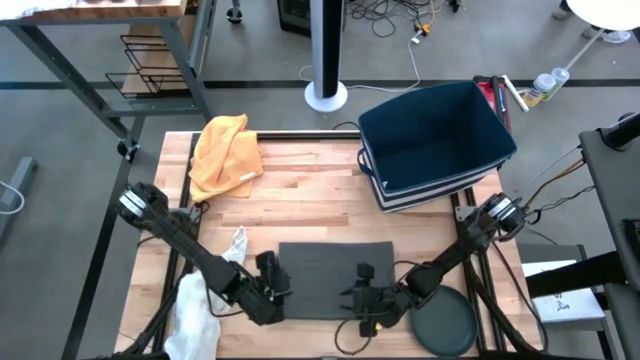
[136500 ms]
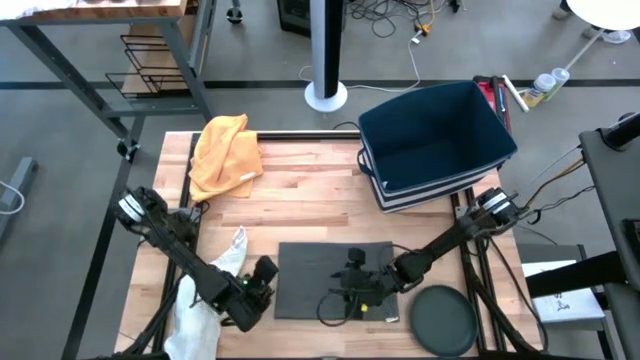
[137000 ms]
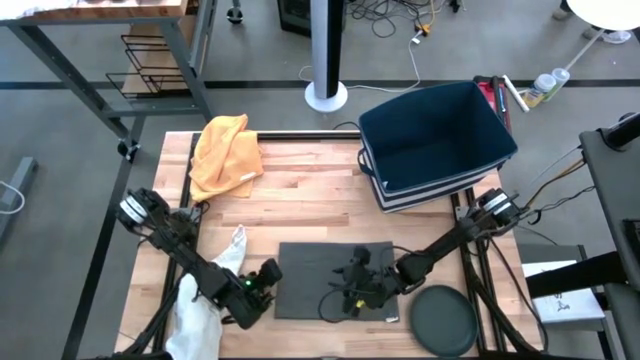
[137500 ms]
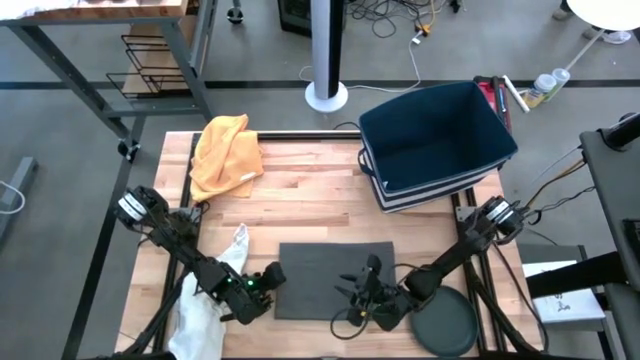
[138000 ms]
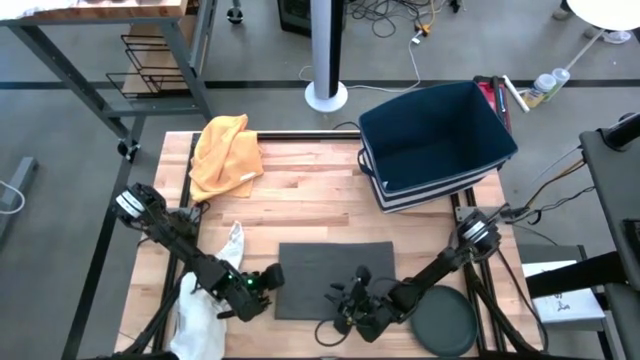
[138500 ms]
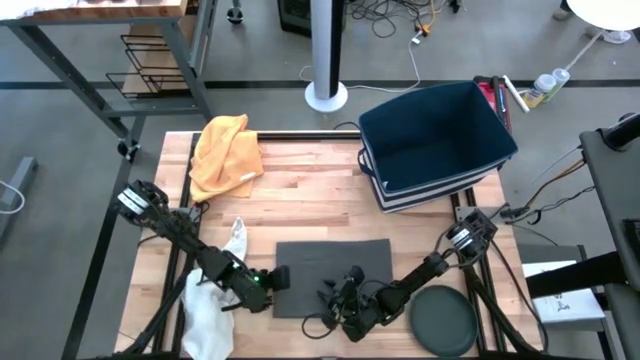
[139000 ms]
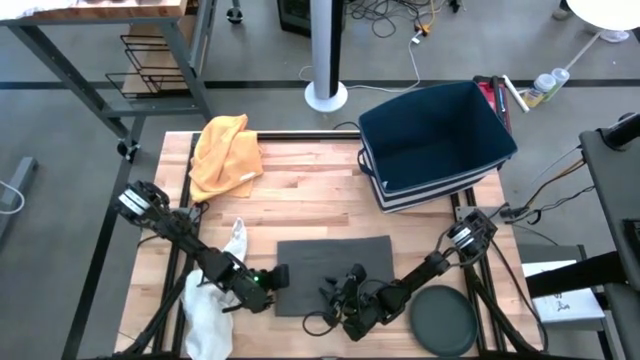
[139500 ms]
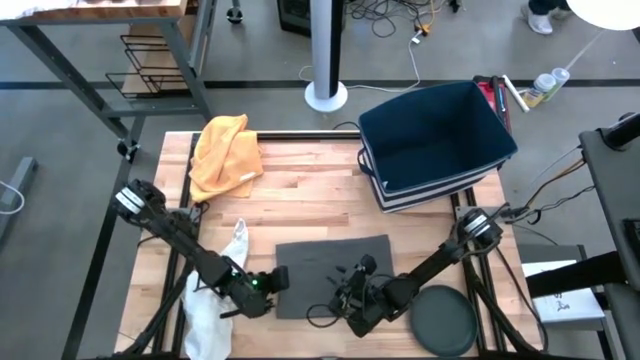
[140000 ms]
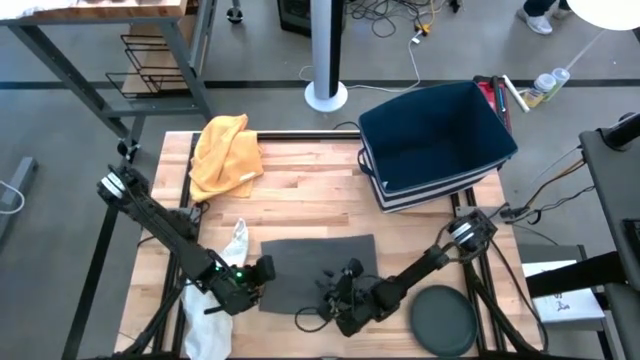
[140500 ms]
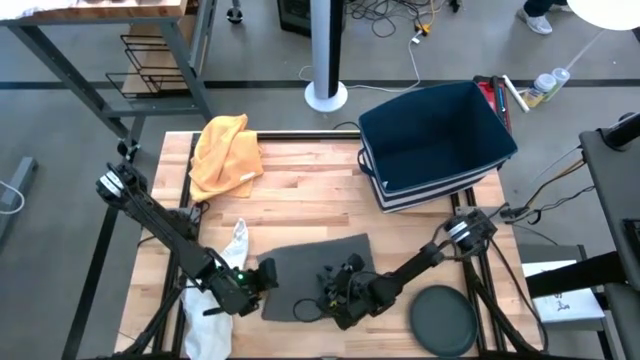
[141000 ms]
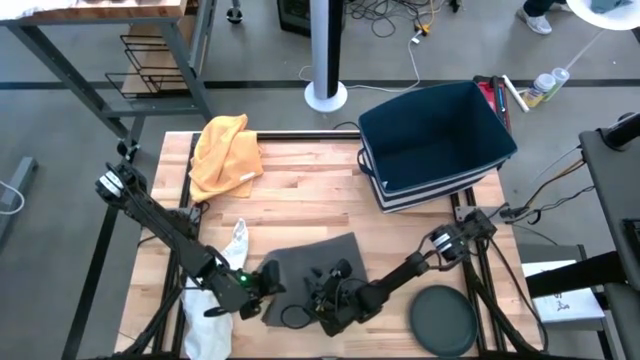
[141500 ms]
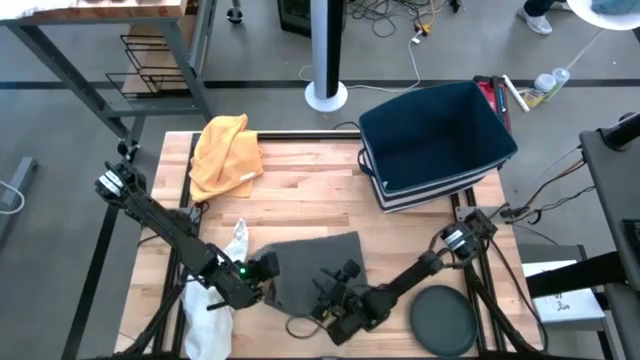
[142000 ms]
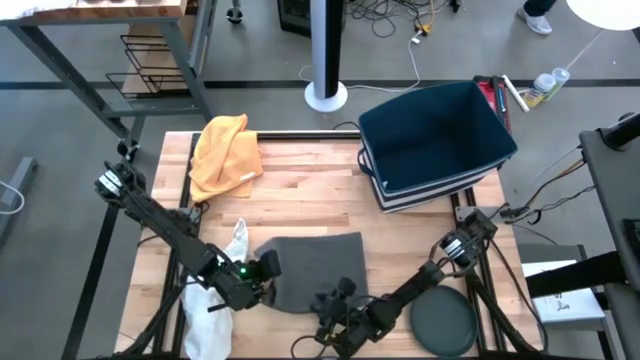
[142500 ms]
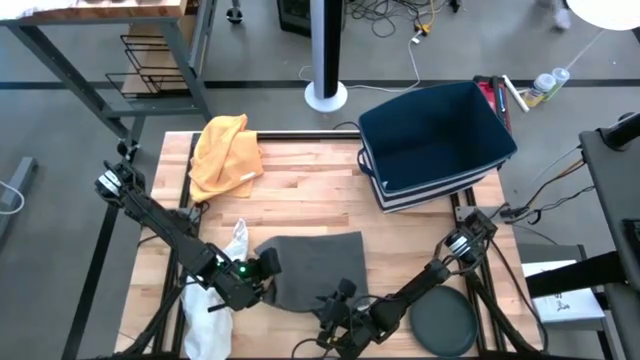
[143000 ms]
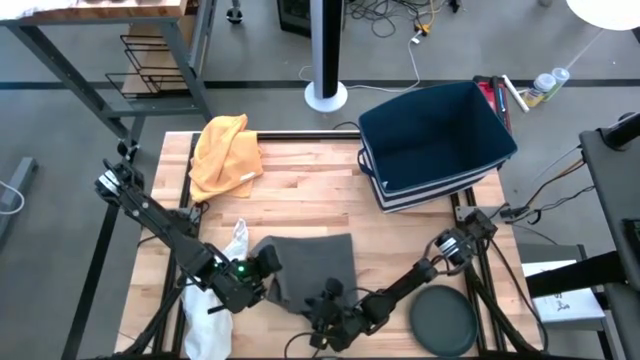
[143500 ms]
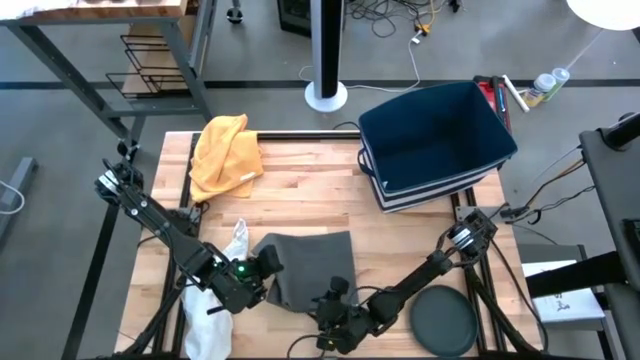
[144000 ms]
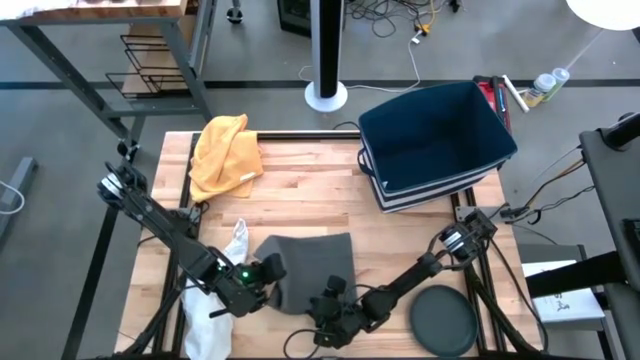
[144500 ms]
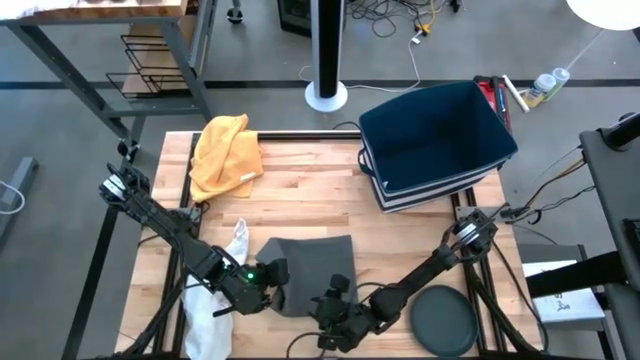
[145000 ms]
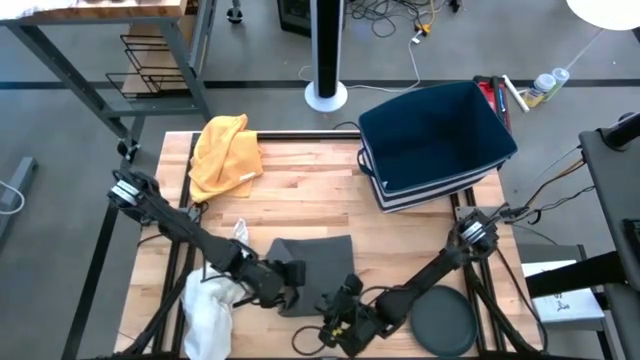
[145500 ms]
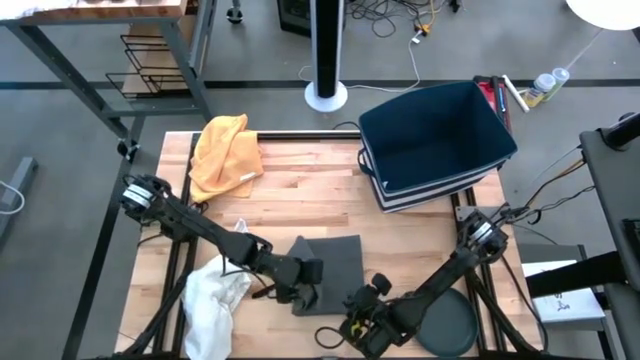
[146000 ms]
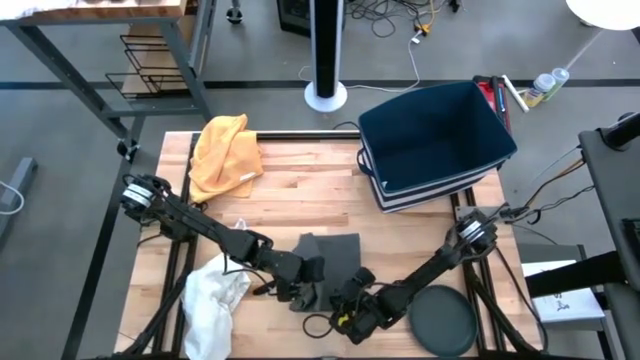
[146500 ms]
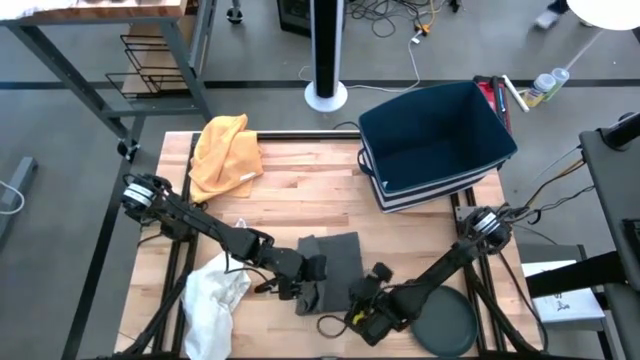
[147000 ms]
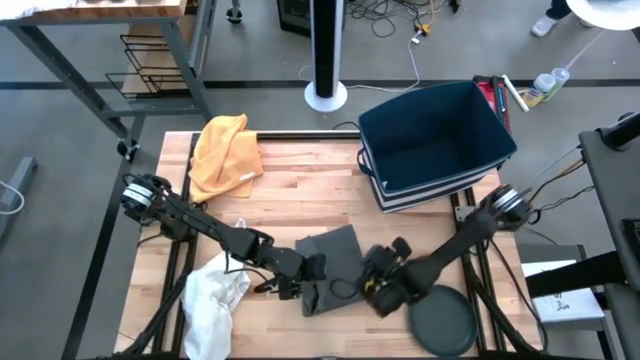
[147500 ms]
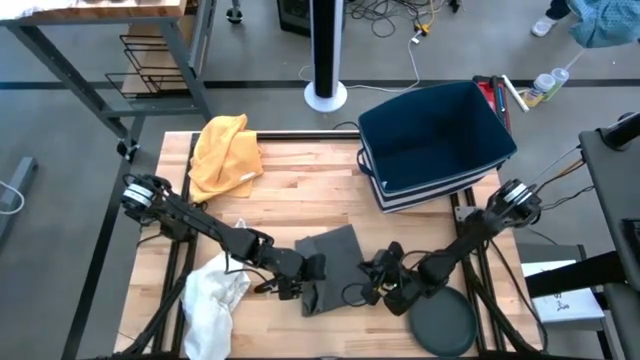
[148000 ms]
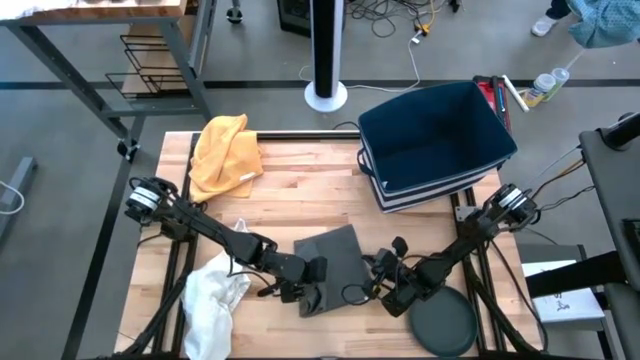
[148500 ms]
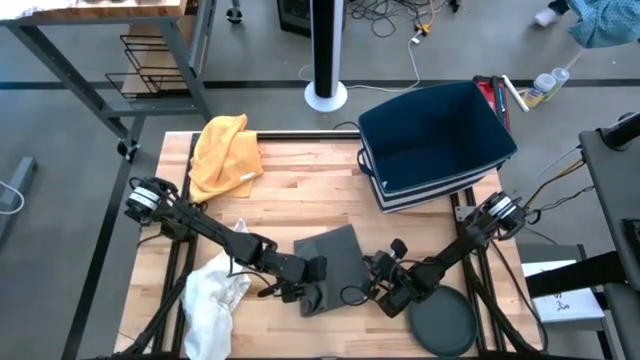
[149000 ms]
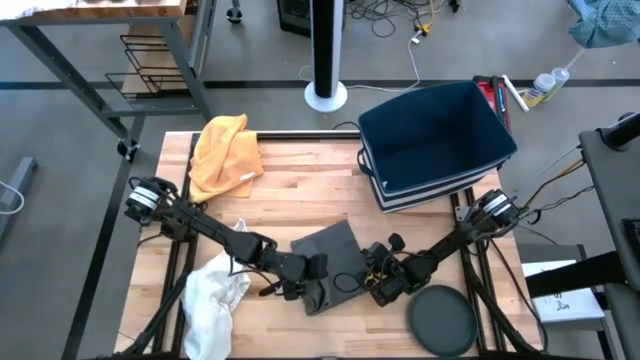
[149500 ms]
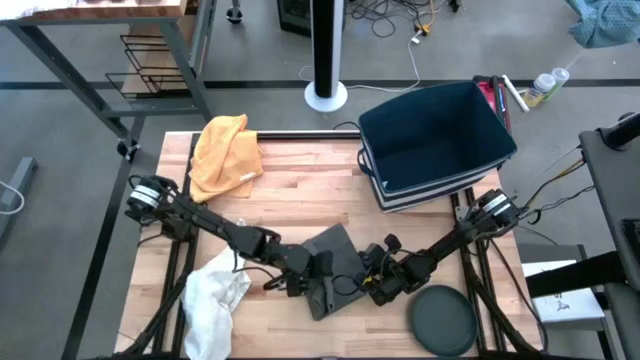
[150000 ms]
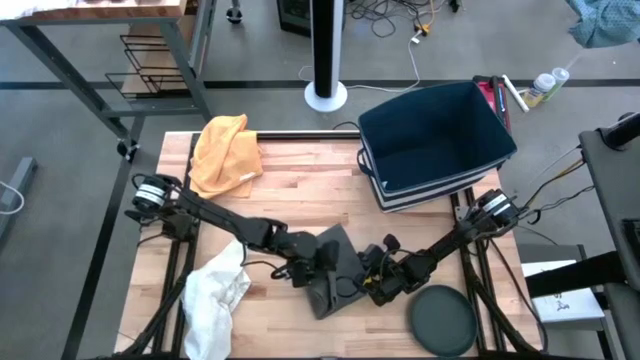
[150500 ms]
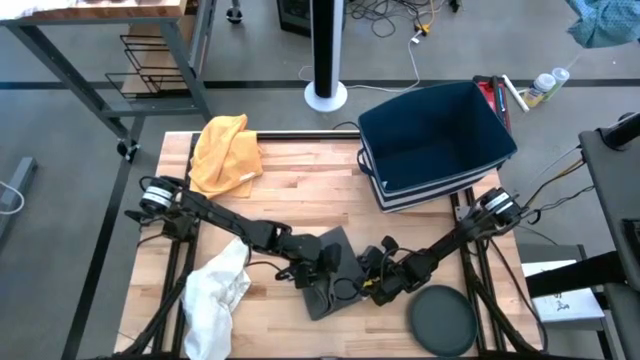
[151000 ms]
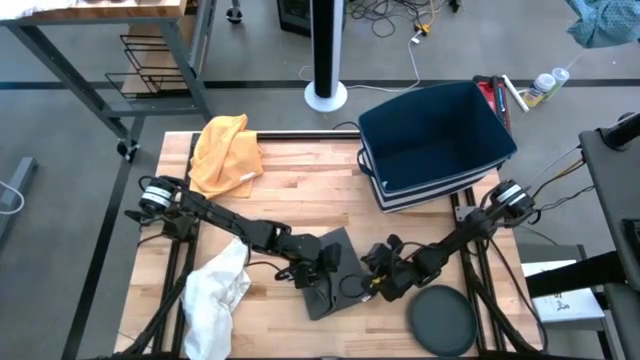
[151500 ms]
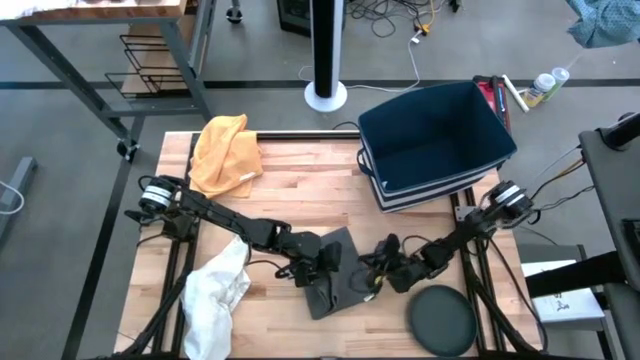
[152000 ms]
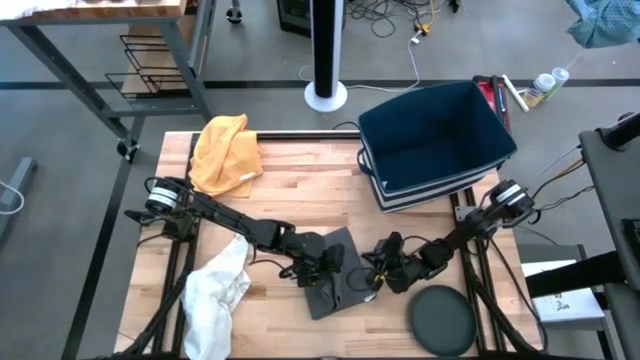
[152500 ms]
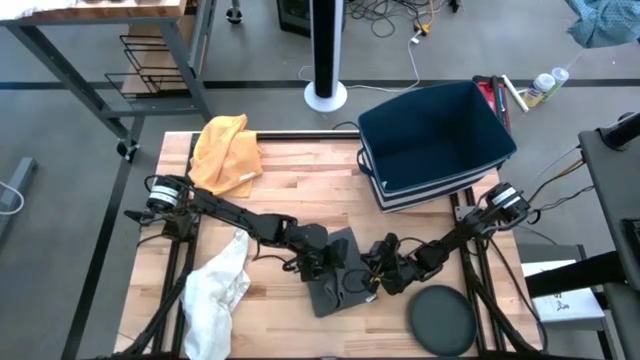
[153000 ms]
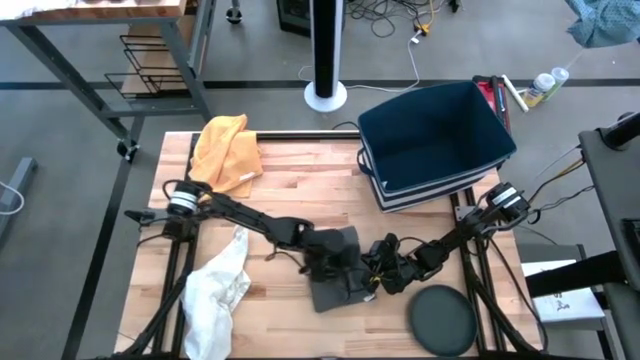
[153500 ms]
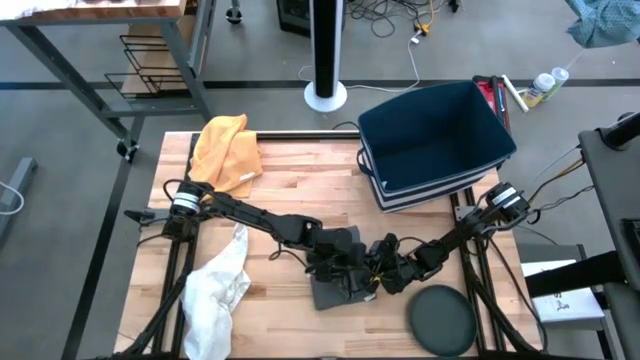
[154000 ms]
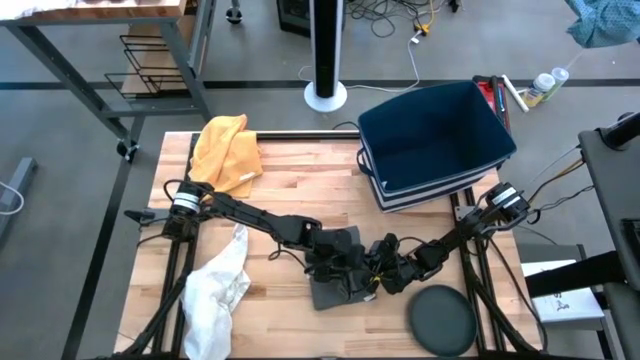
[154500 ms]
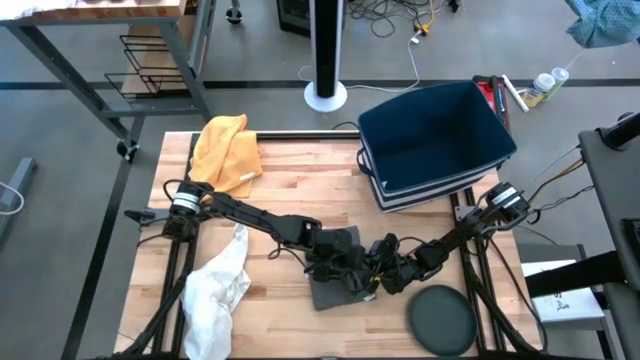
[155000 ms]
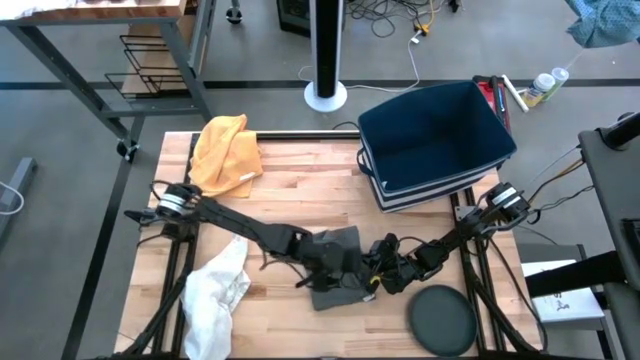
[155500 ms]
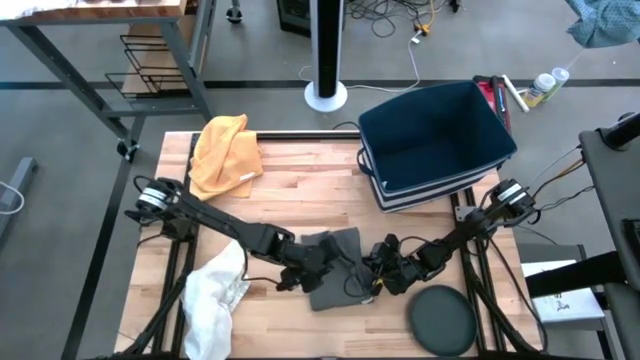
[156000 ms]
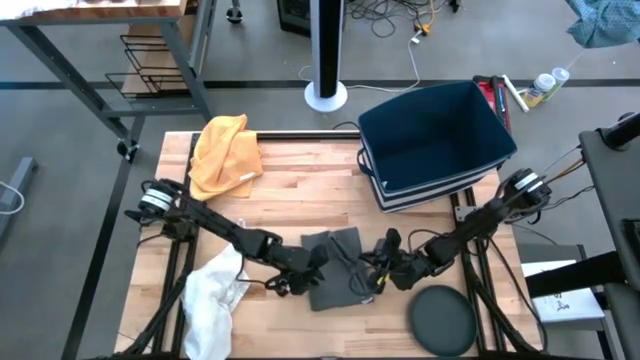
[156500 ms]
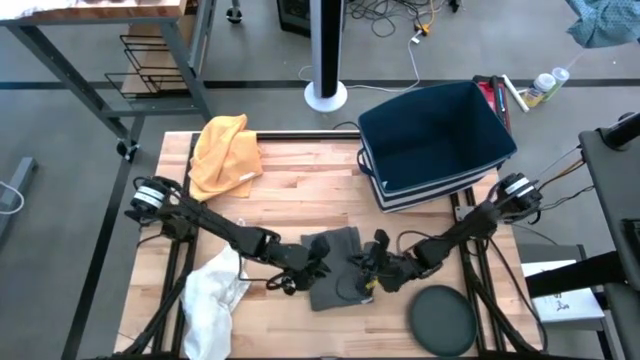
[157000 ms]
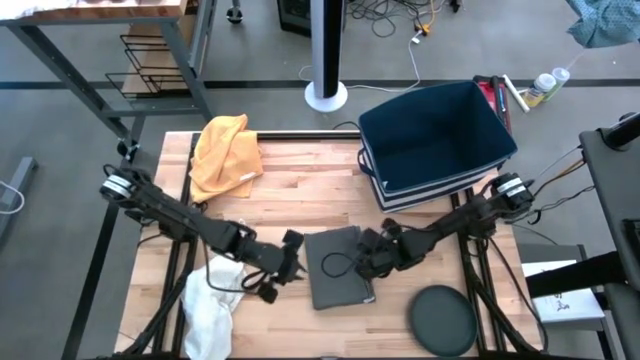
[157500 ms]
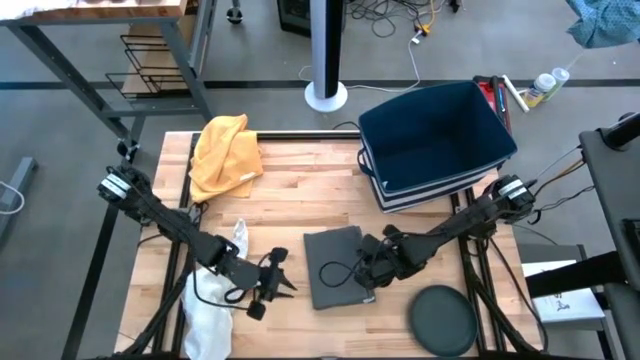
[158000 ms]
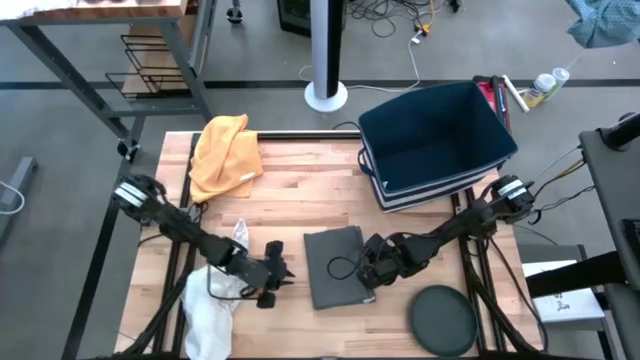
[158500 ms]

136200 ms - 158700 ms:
Task: Fold kitchen towel into neat rectangle
Fold the gray towel
